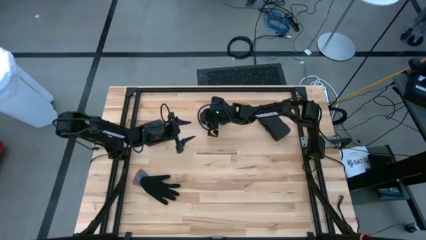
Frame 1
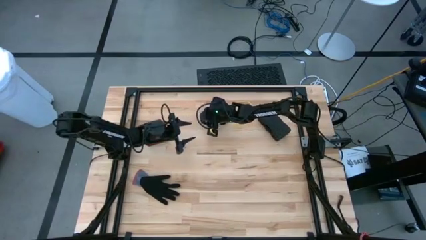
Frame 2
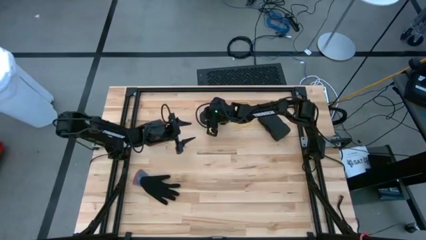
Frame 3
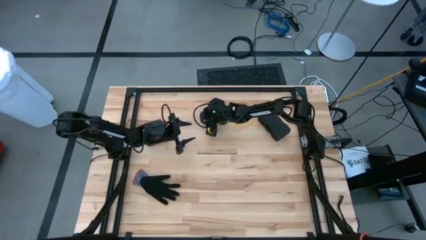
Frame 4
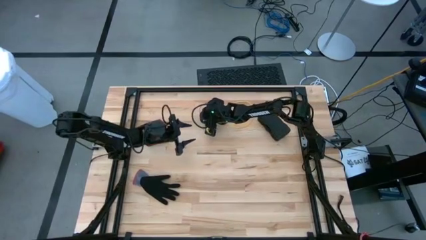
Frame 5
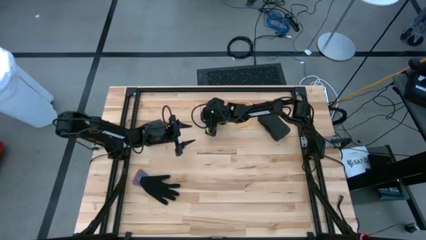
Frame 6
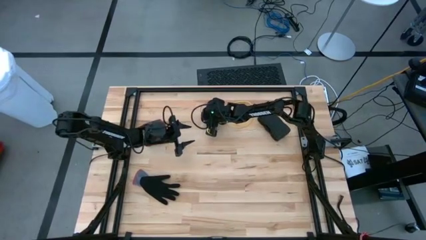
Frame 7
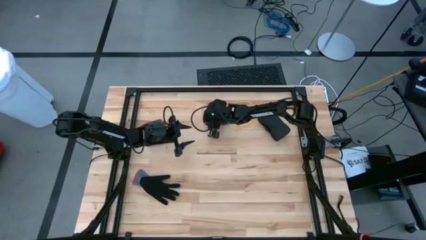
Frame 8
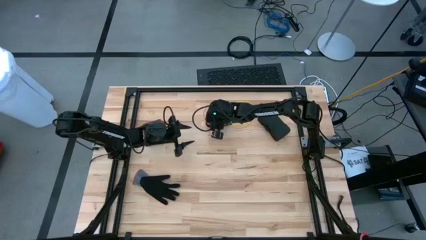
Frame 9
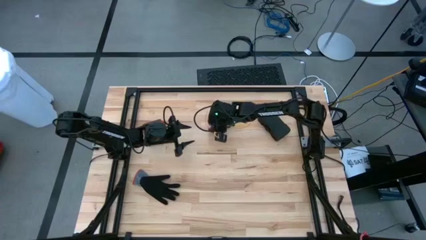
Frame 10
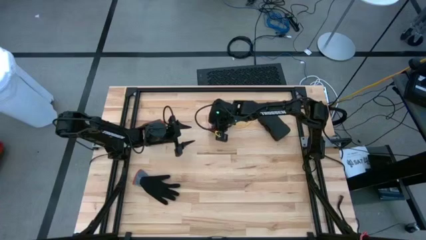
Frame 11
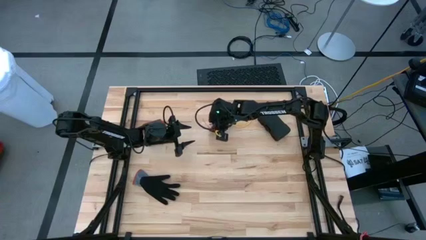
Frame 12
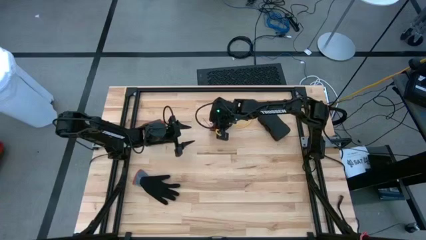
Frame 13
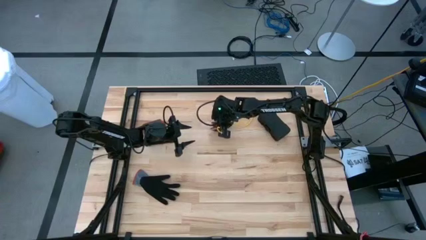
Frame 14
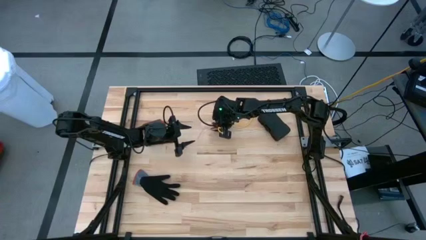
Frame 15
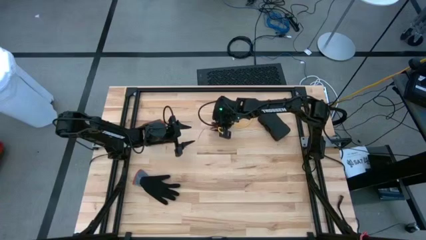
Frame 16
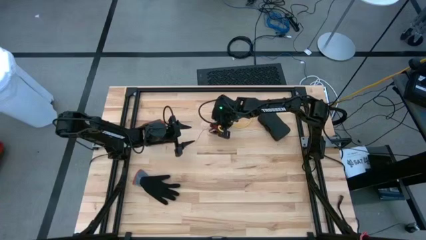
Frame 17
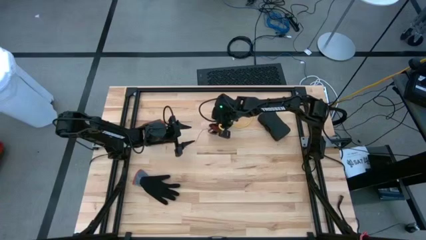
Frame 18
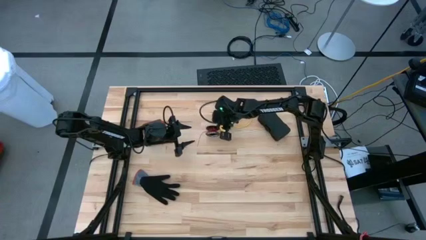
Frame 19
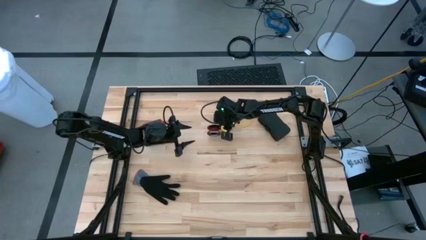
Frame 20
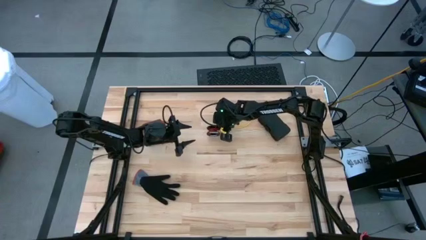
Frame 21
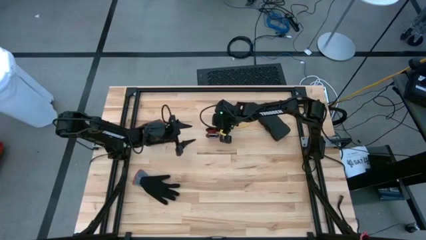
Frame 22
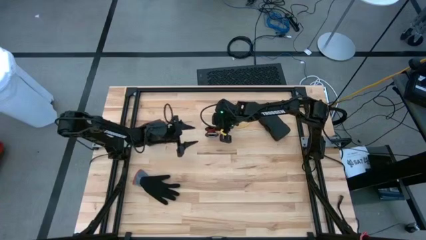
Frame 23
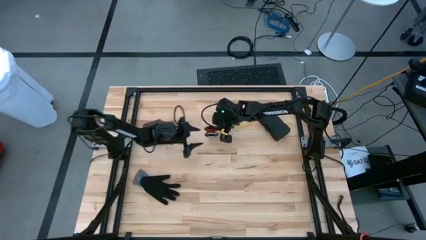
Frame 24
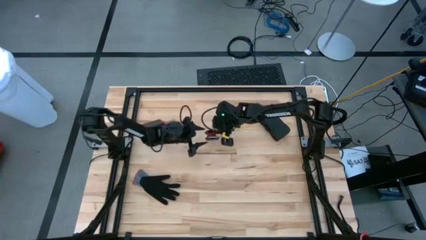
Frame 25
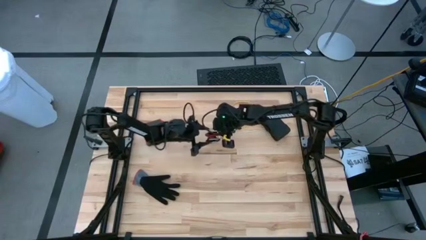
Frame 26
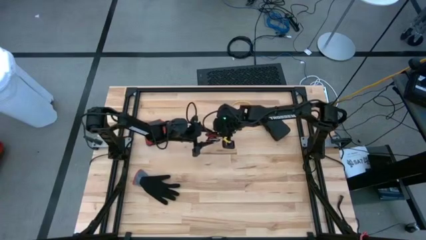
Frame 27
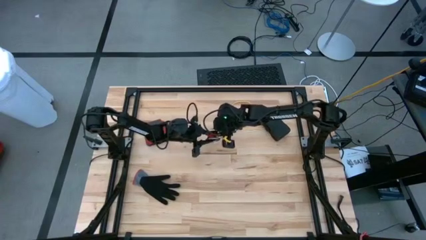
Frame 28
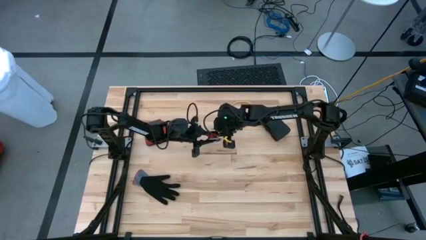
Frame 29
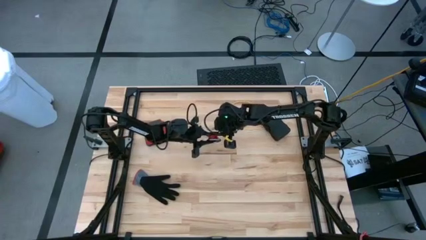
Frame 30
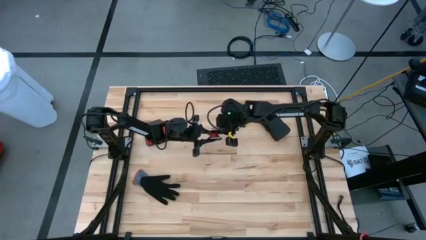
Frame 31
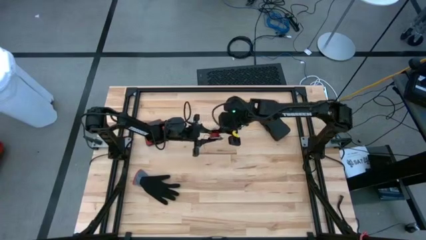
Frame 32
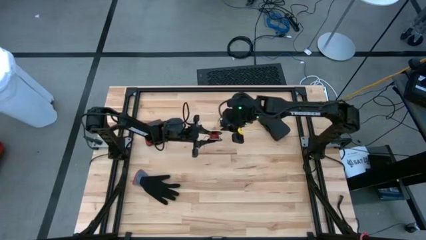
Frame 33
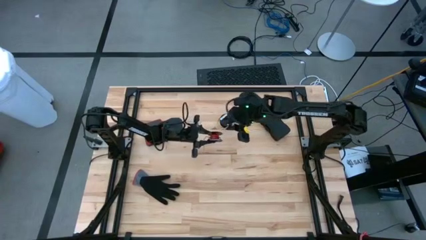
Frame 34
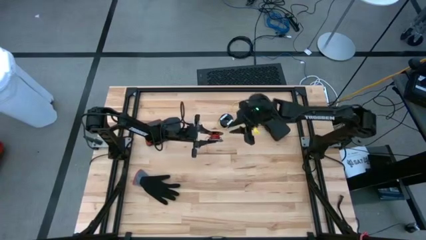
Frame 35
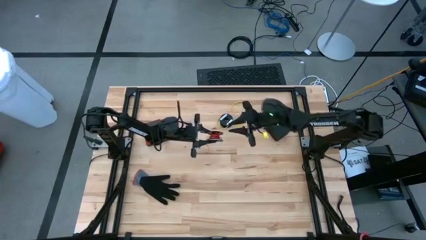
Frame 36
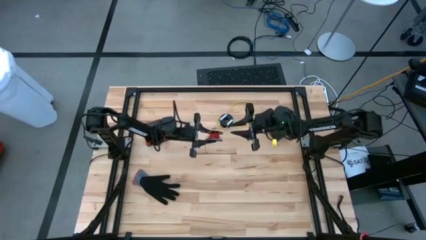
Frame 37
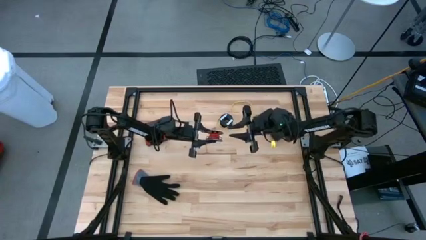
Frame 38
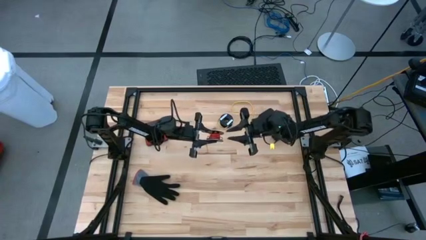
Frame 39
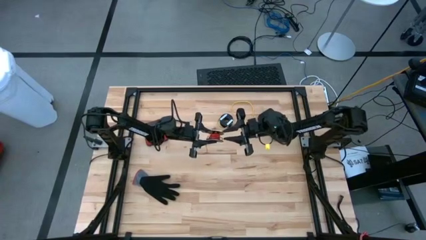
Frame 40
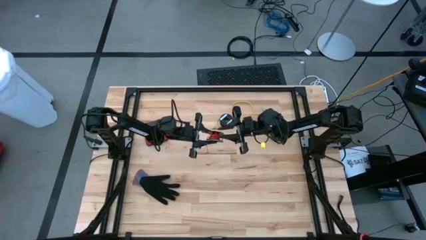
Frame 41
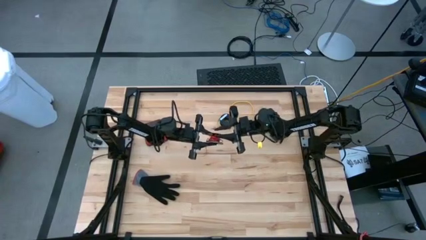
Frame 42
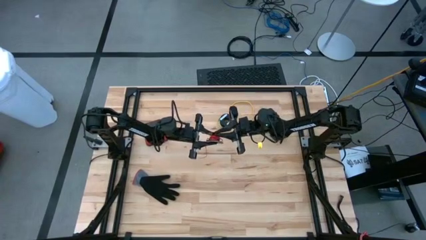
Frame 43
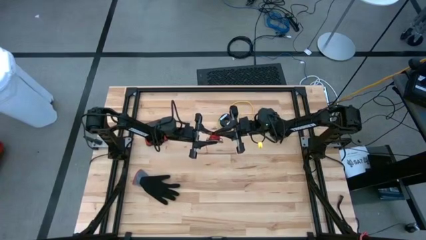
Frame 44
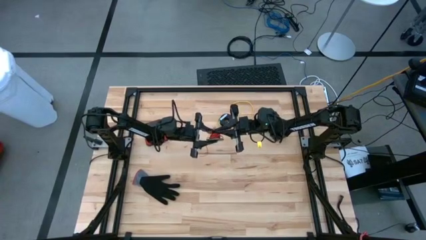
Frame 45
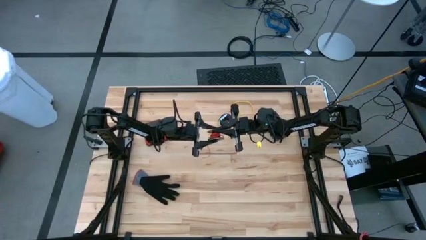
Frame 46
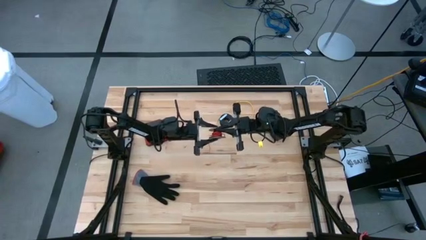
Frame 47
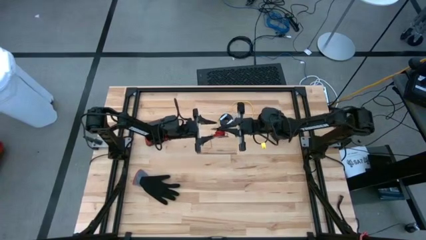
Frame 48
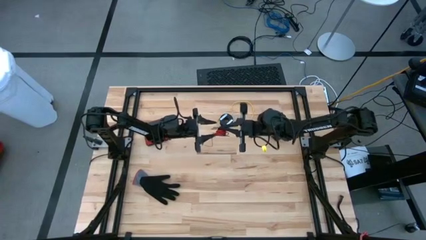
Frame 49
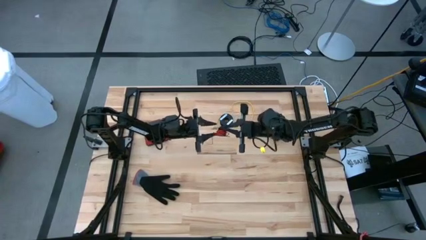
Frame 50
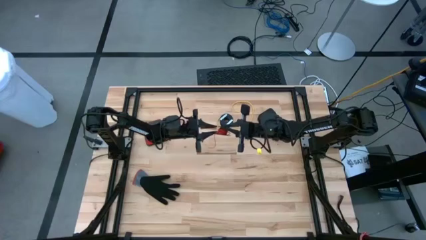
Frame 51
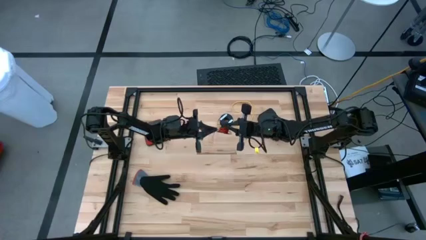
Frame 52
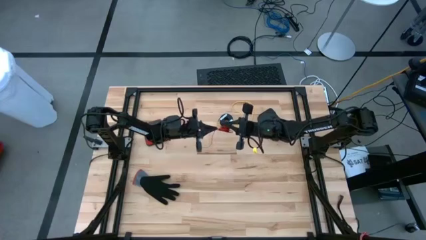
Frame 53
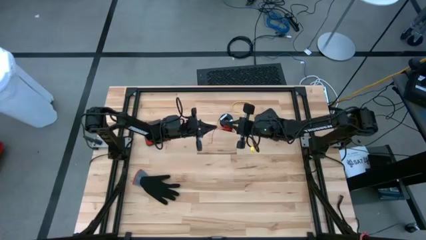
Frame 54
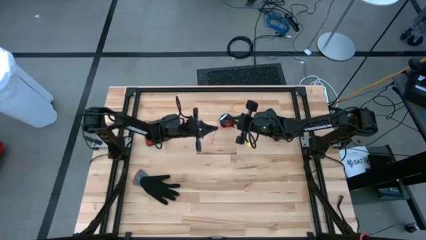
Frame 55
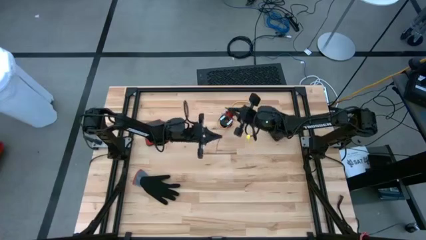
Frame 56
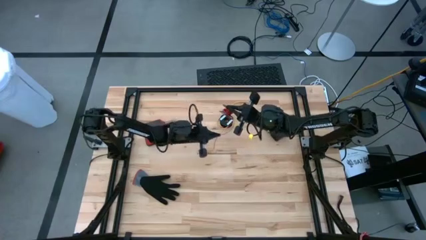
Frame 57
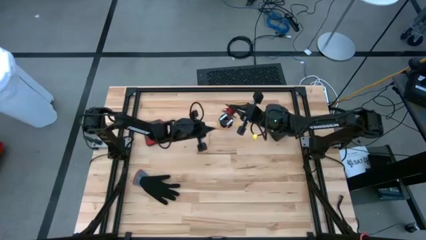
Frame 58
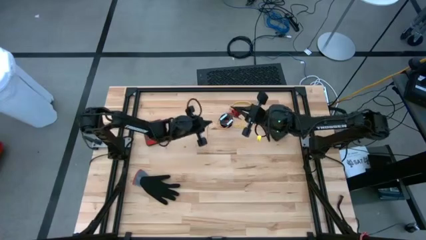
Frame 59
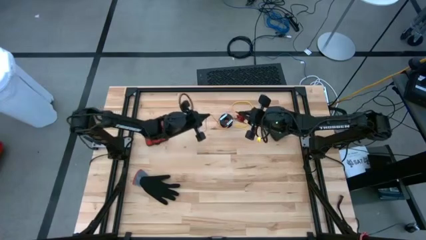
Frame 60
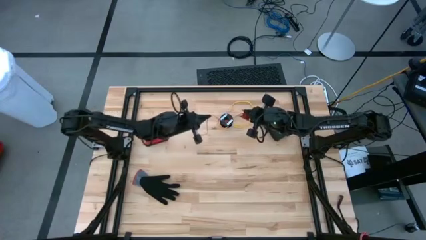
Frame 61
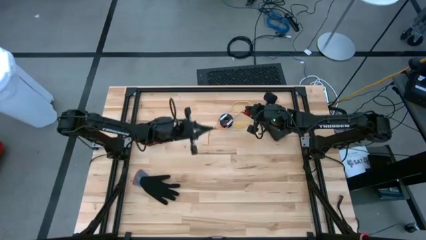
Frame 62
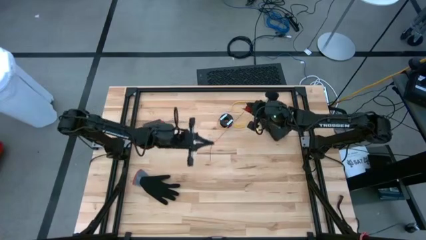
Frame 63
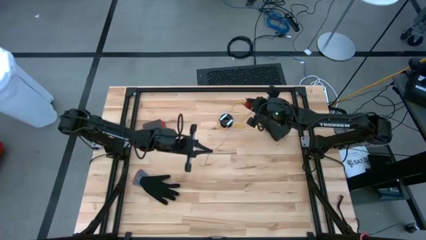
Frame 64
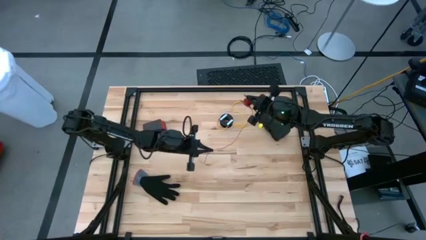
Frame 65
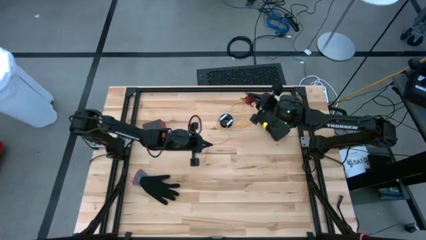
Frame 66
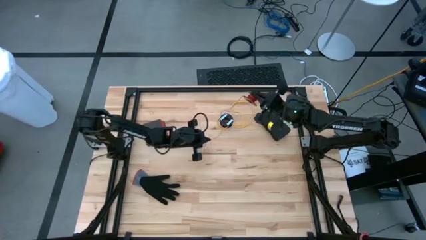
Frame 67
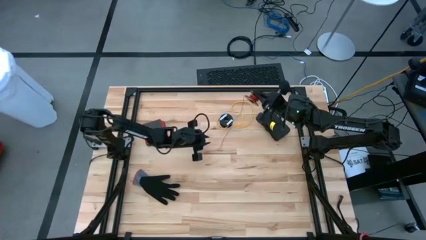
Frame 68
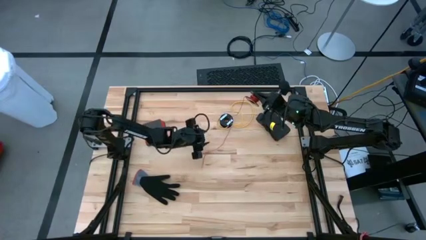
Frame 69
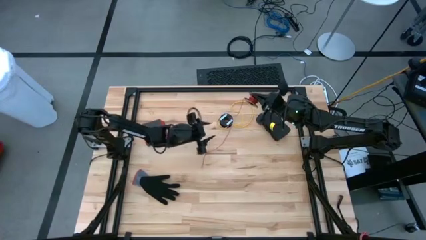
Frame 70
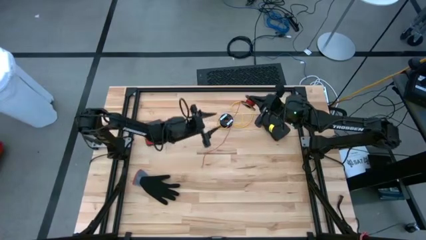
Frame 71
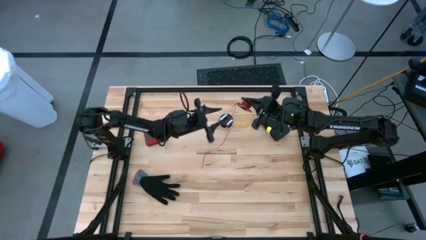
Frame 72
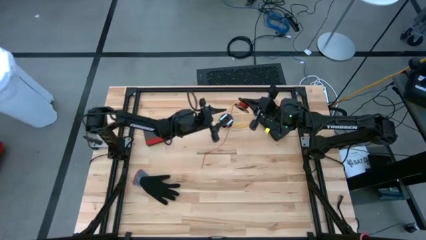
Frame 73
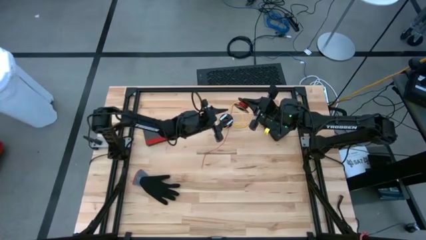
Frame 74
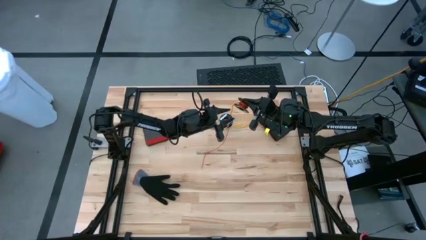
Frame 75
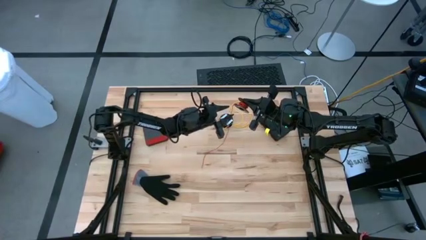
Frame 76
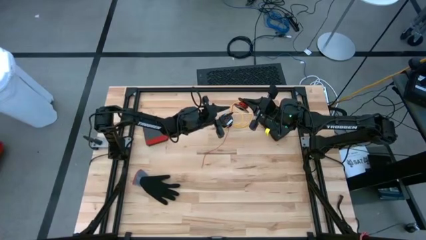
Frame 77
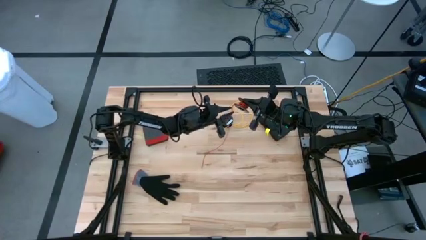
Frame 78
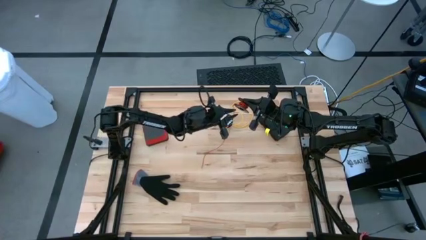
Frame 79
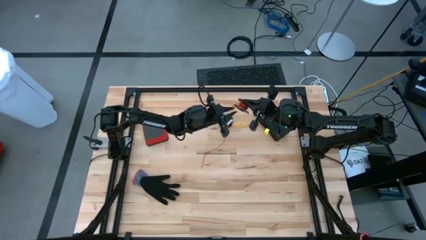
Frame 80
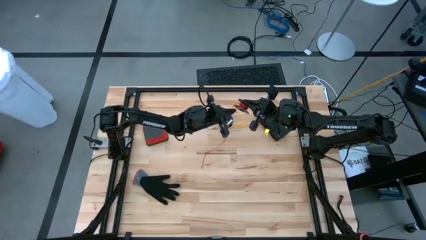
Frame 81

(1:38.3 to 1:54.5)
Task: Coil cords
Uncoil the red wire from the spool
